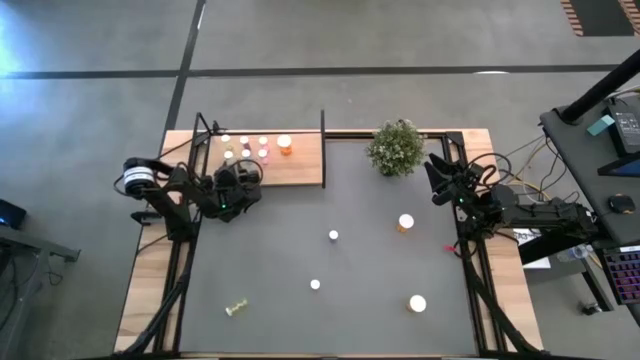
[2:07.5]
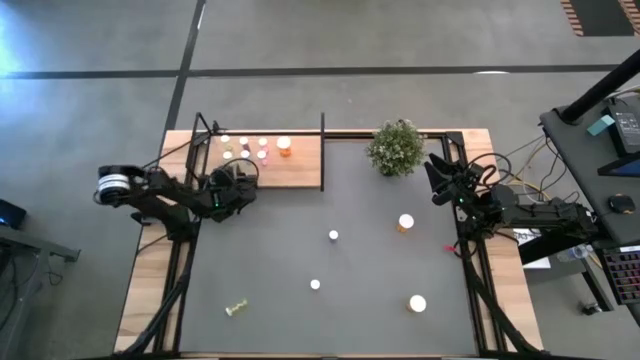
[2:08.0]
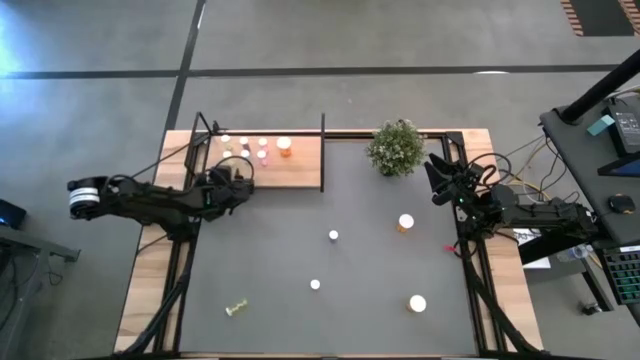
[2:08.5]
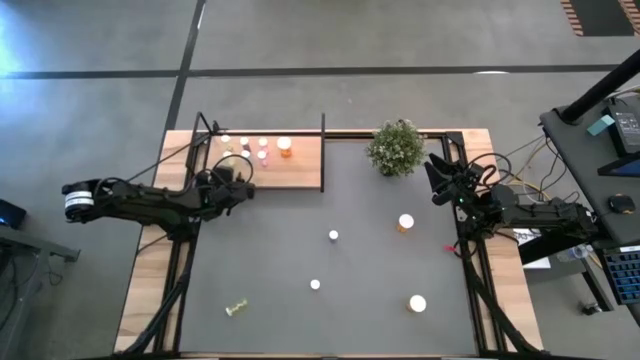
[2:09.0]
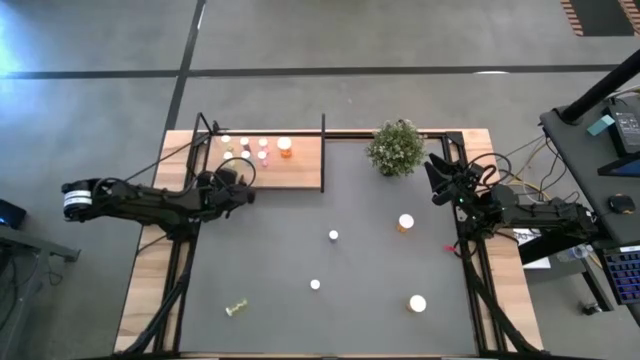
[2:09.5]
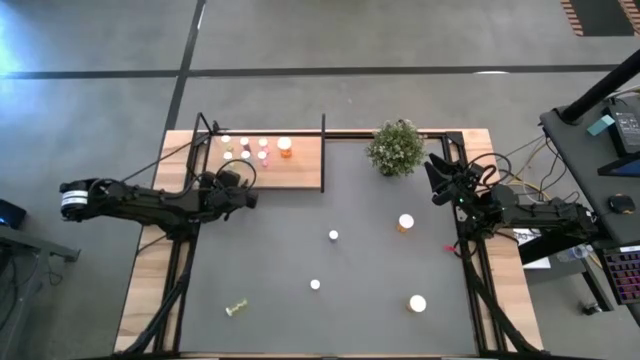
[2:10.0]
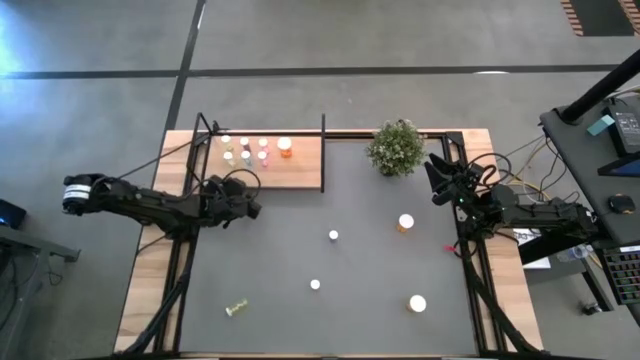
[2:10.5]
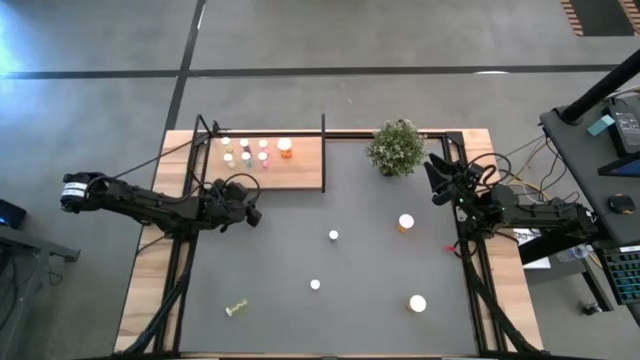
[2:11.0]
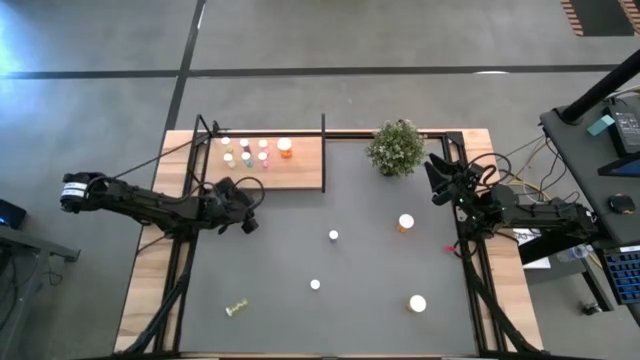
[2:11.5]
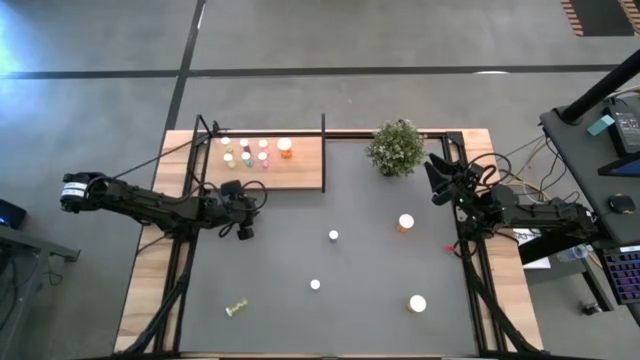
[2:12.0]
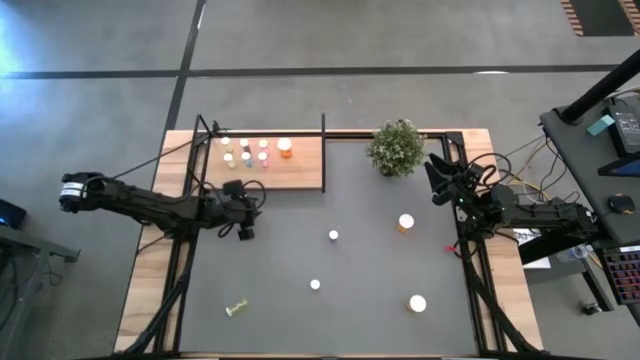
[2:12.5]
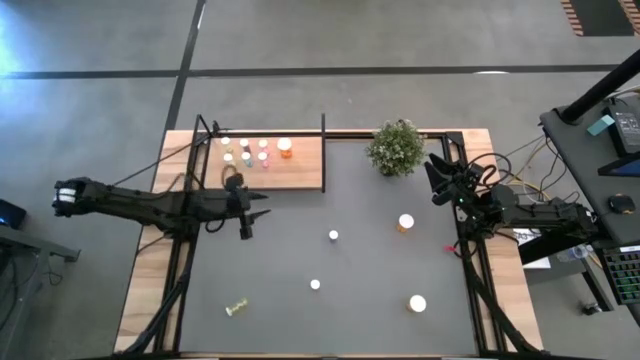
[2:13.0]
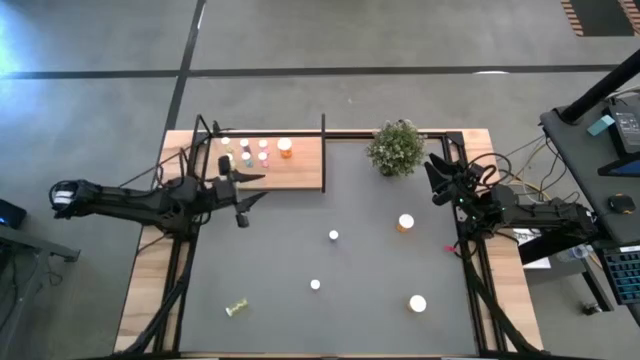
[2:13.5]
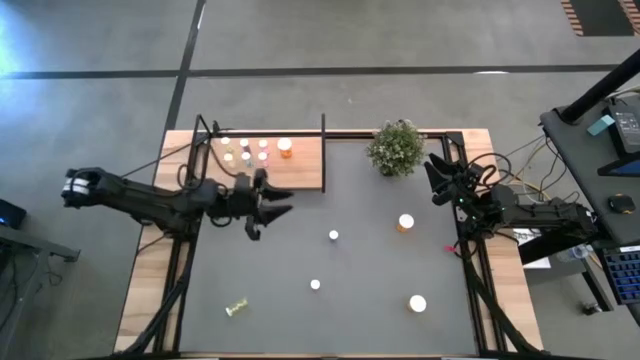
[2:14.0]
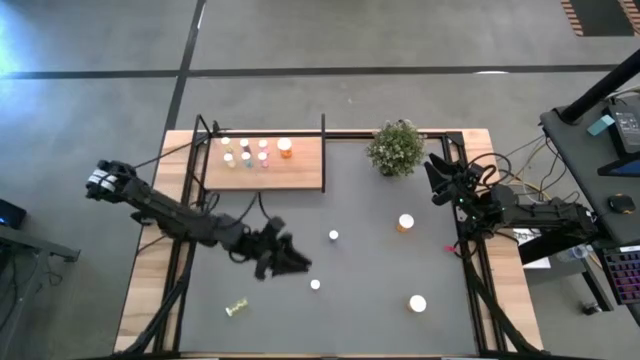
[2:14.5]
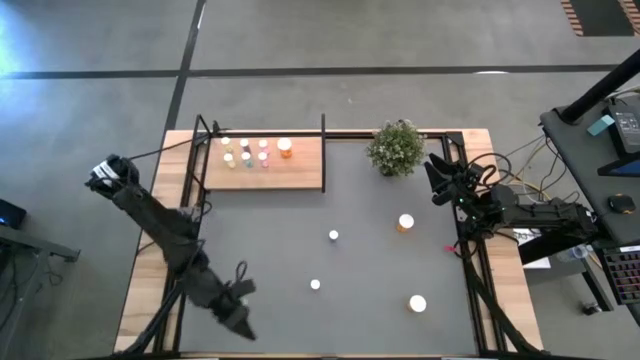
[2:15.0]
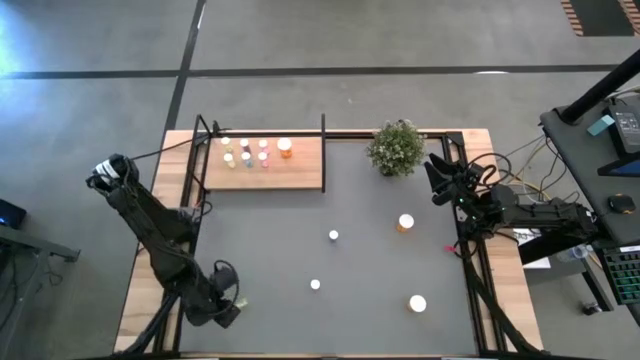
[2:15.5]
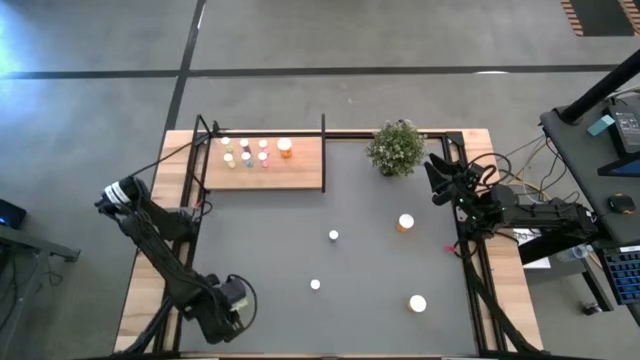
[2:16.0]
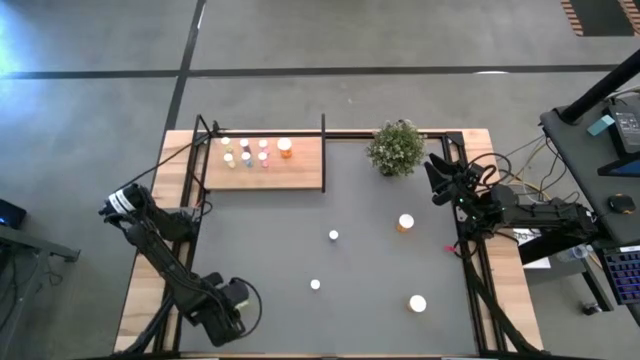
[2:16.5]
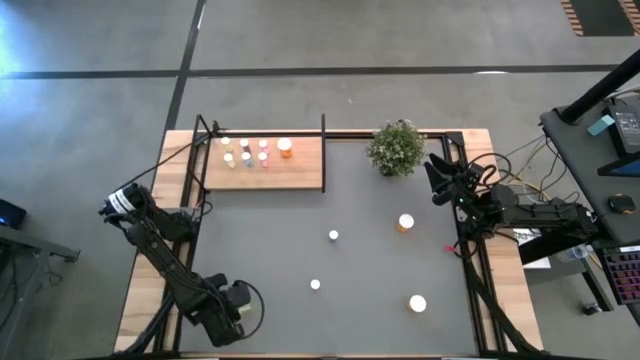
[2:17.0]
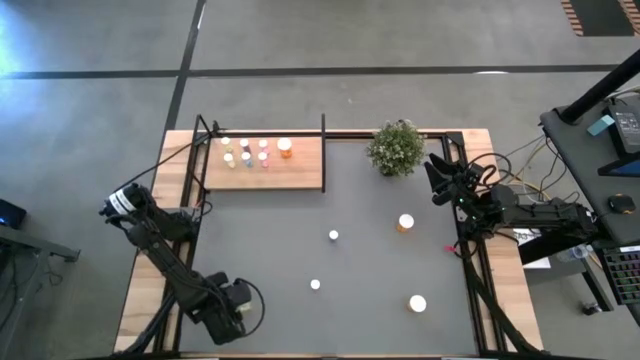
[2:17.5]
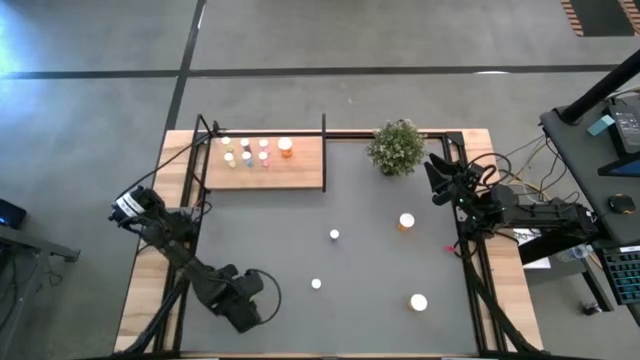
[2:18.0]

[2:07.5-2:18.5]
Task: Pick and place medicine bottles onto shelf by color
Put the yellow pill bottle on the shelf aligned with the other yellow pill bottles

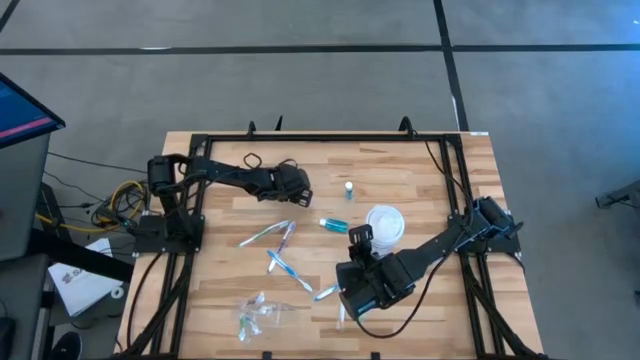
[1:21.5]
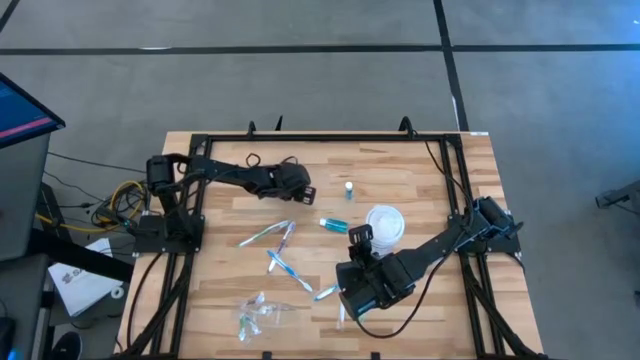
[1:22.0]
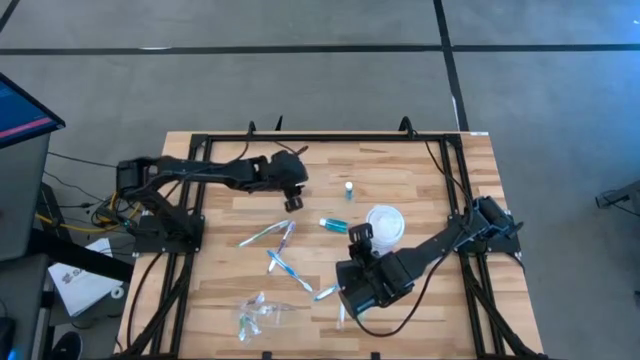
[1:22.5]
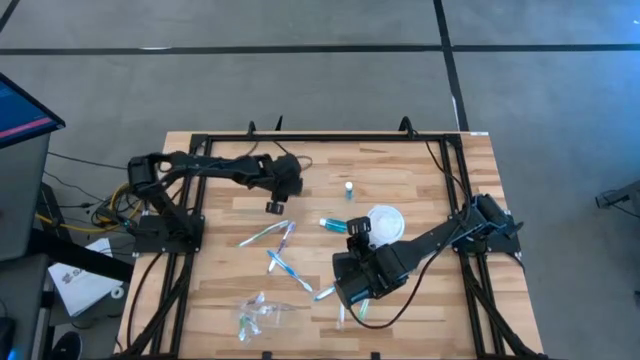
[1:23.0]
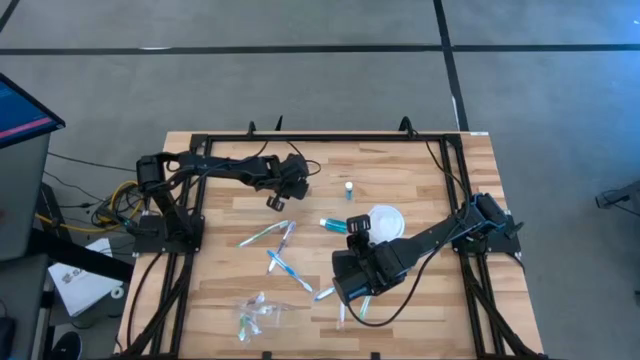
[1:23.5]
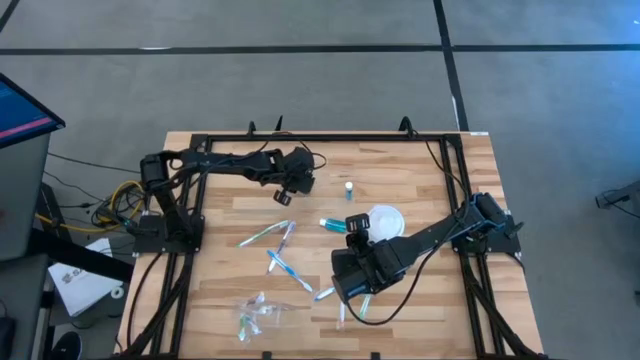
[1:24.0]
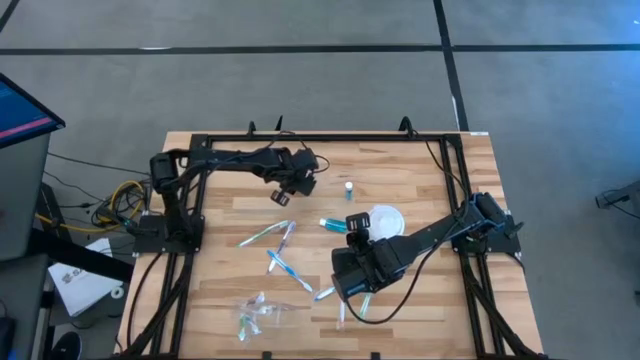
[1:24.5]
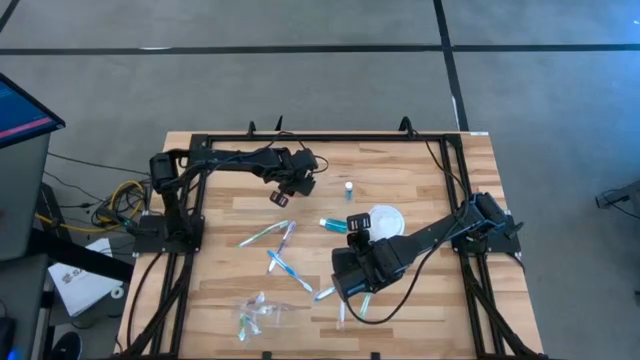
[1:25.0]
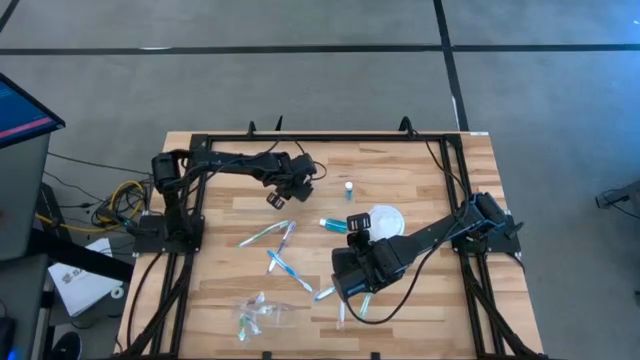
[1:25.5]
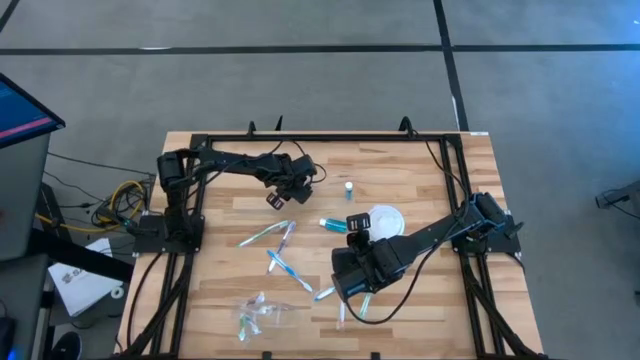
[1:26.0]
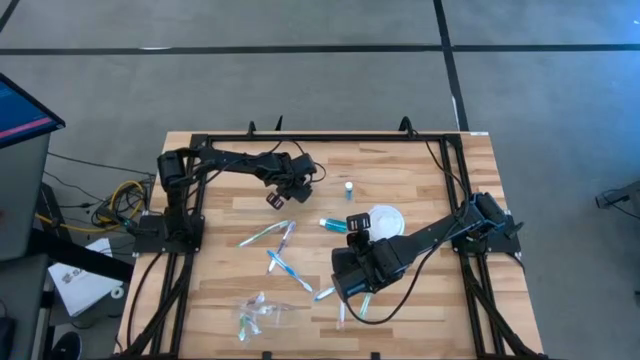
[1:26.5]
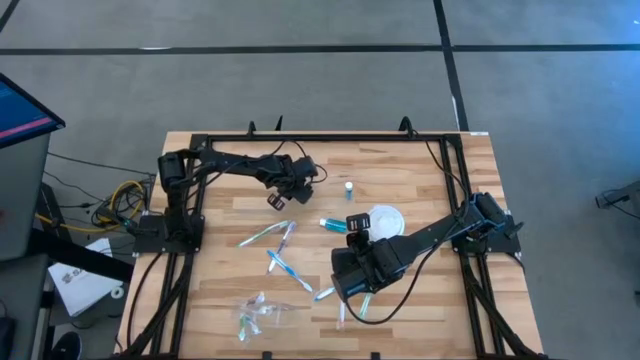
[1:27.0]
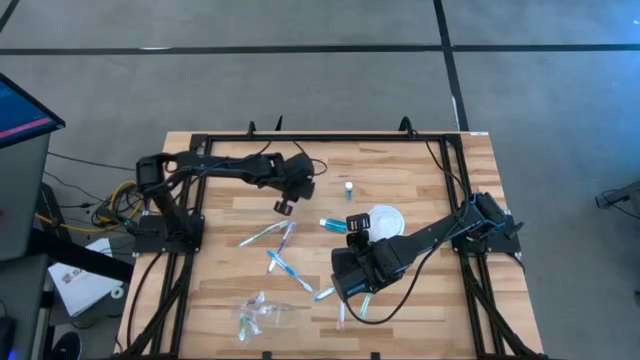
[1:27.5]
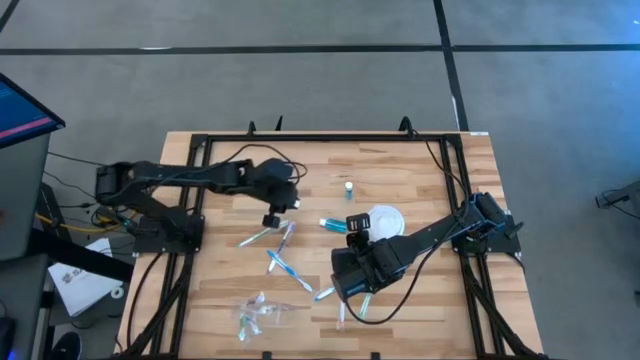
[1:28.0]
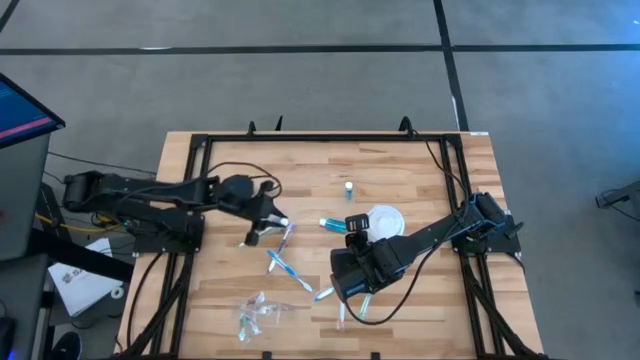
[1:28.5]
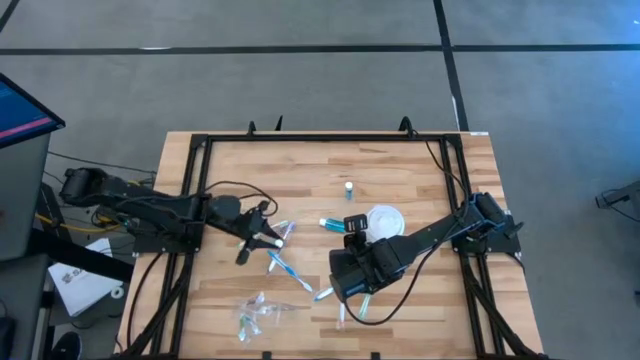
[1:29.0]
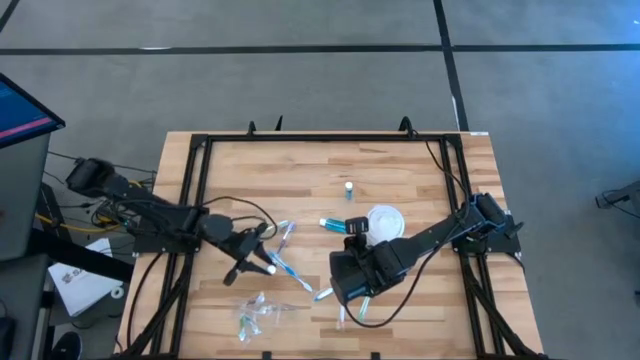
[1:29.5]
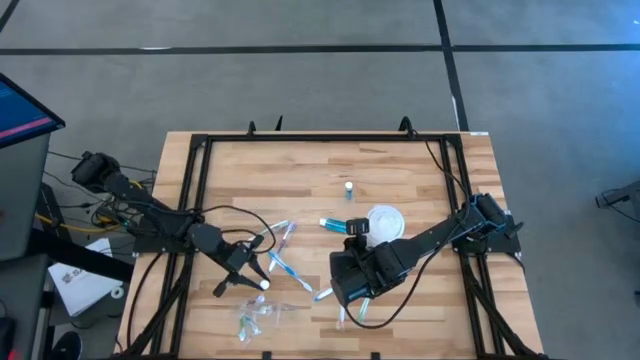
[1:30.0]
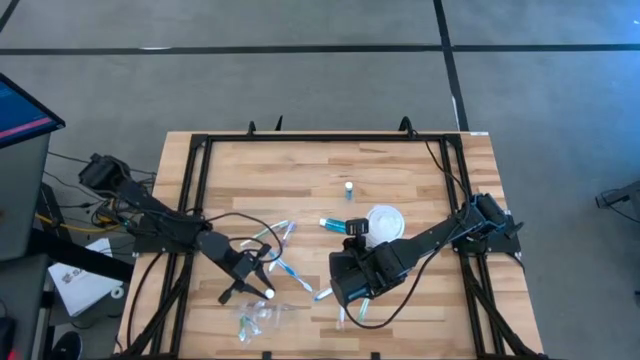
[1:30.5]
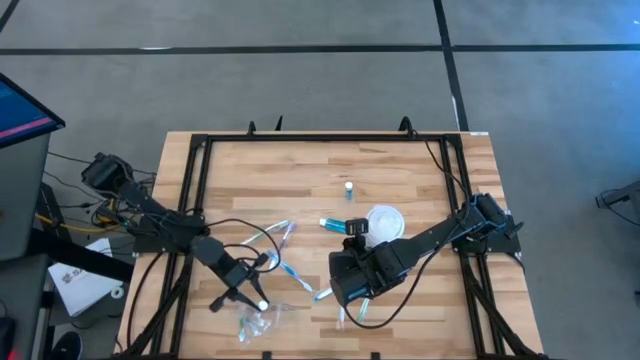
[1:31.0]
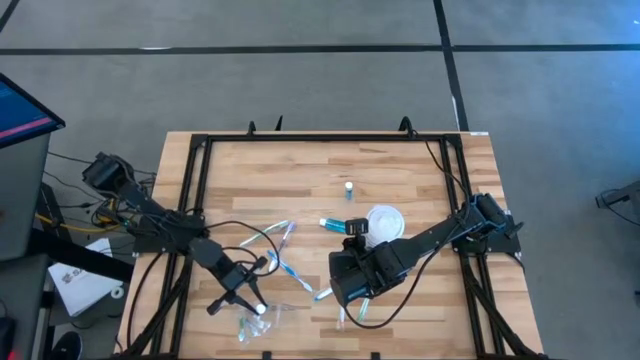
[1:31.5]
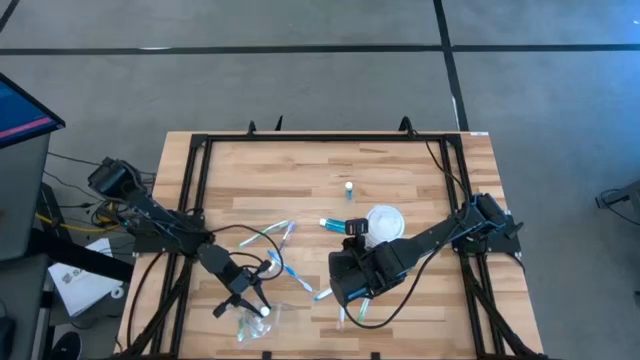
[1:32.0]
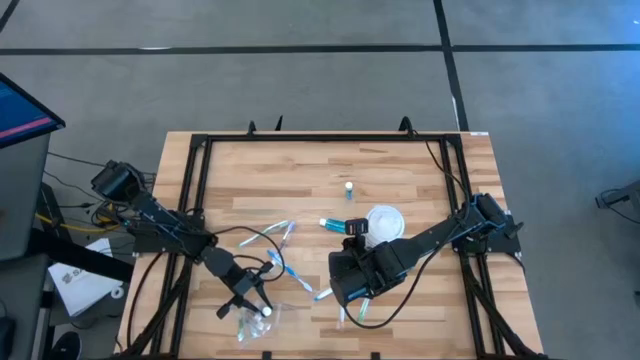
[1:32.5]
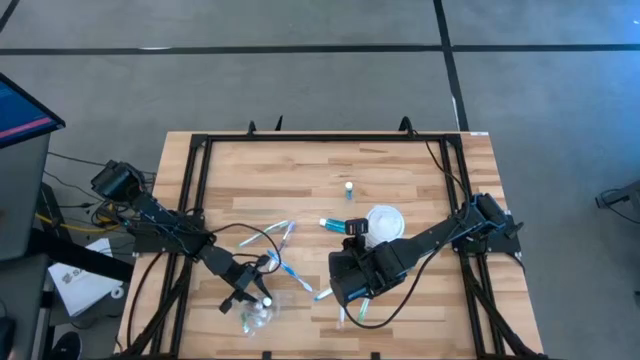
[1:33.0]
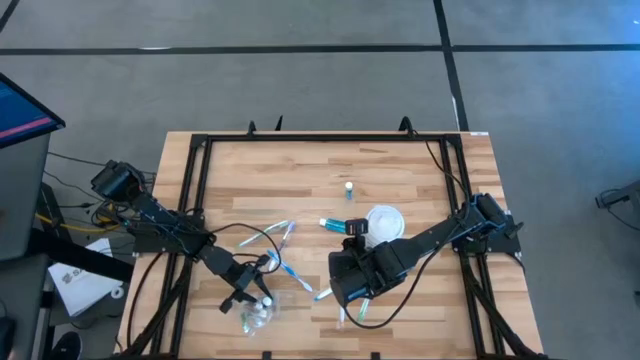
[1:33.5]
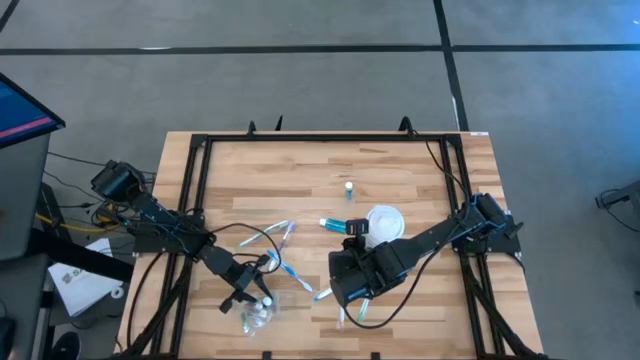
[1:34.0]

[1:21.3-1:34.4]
Task: Pick & Place toothbrushing station
Put the top left blue mouthwash into the transparent organizer
